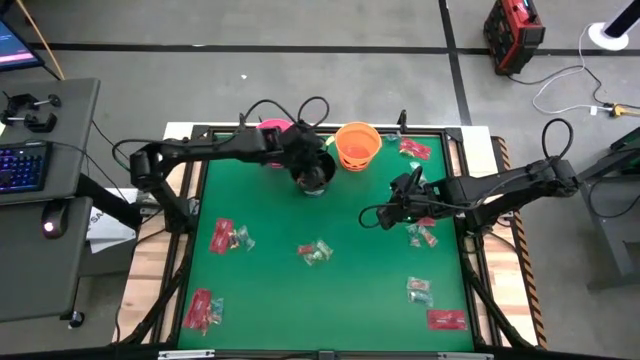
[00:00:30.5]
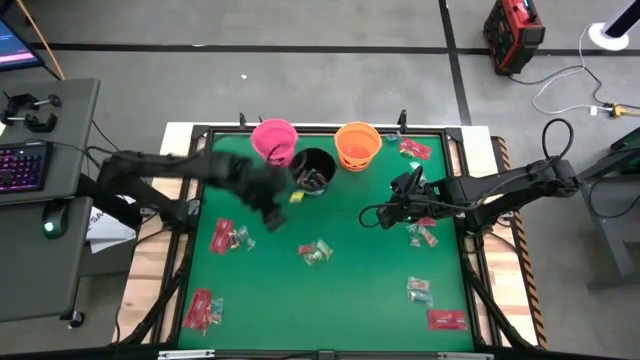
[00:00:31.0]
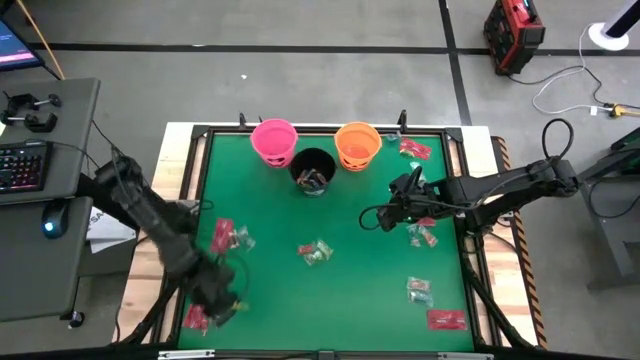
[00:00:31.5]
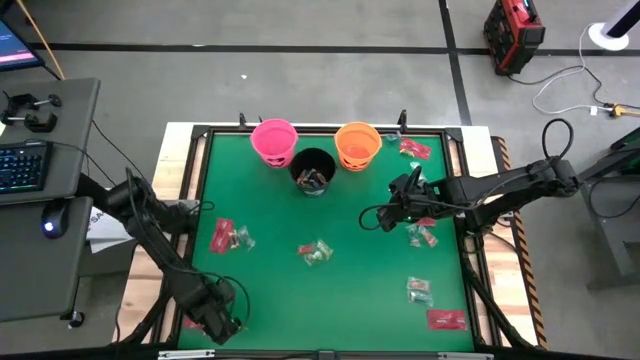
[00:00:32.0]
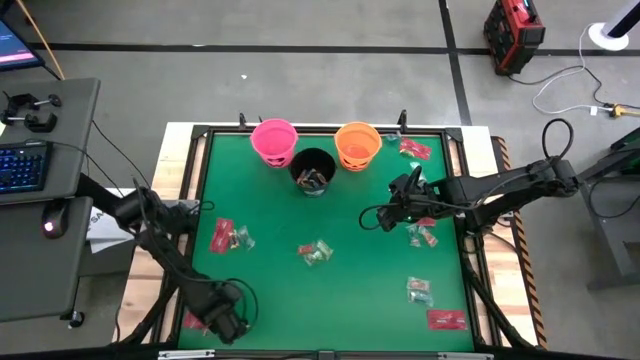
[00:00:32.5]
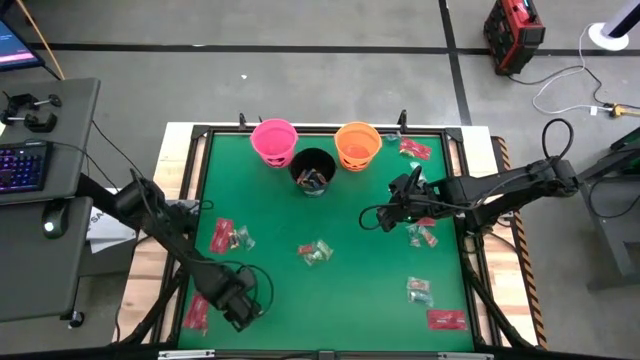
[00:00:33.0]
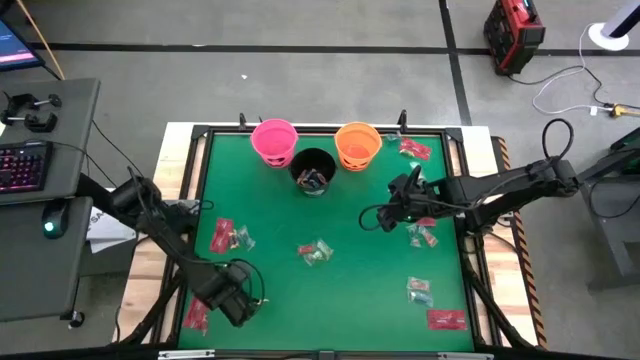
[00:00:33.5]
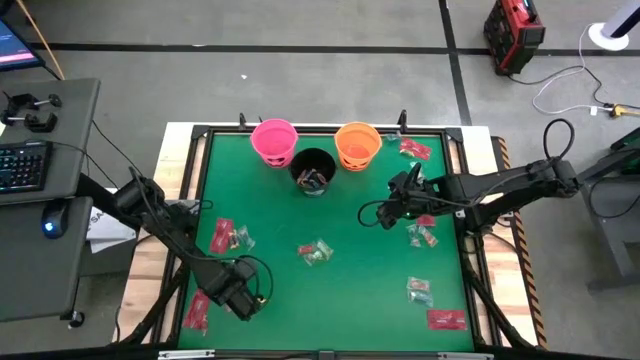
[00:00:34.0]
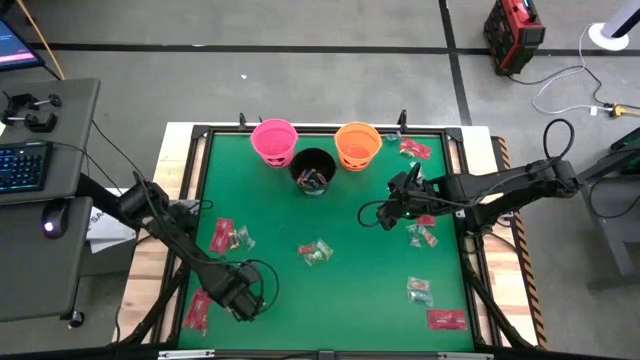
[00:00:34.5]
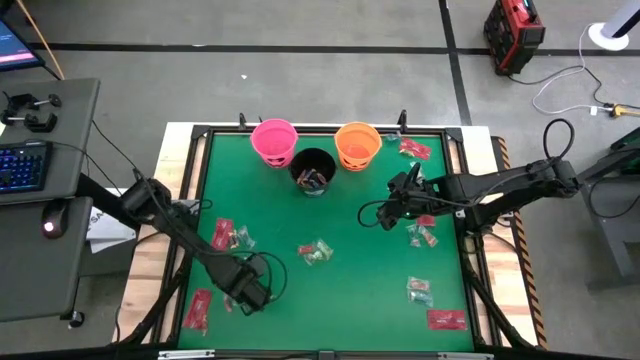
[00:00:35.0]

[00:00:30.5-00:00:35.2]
Task: Sort candy by brand, put in halloween buckets
Adjust the blue gummy

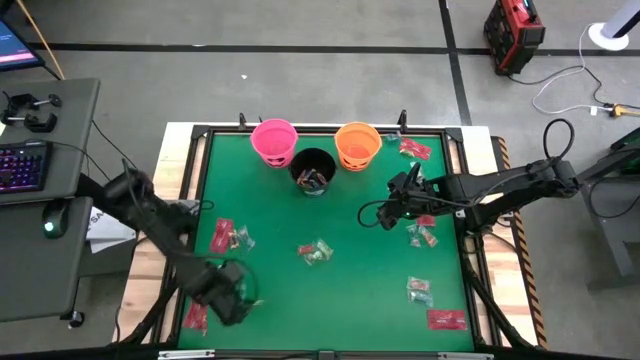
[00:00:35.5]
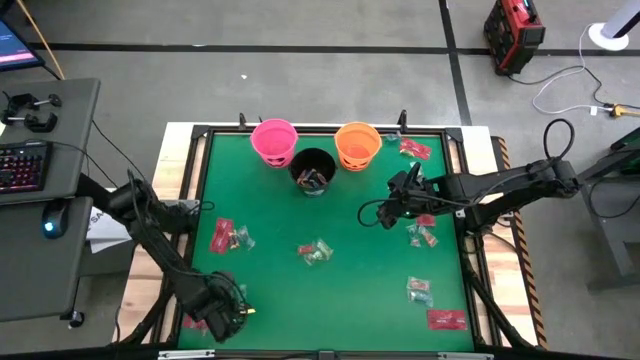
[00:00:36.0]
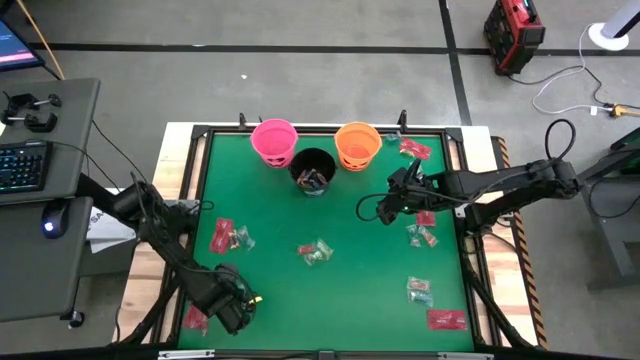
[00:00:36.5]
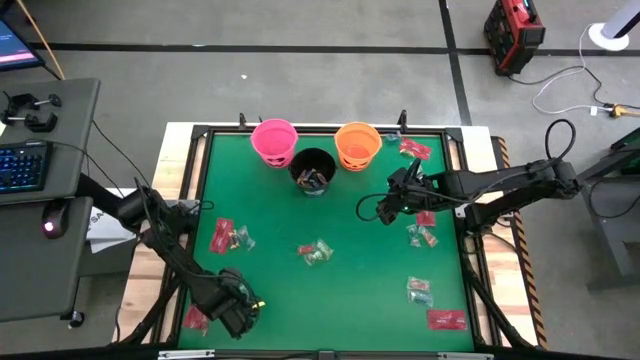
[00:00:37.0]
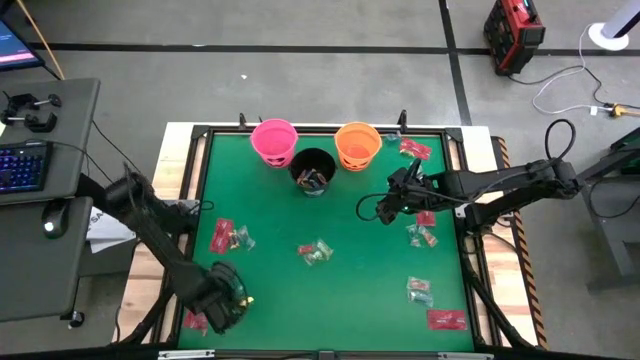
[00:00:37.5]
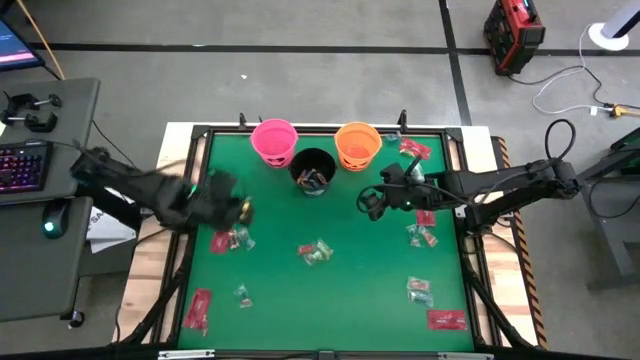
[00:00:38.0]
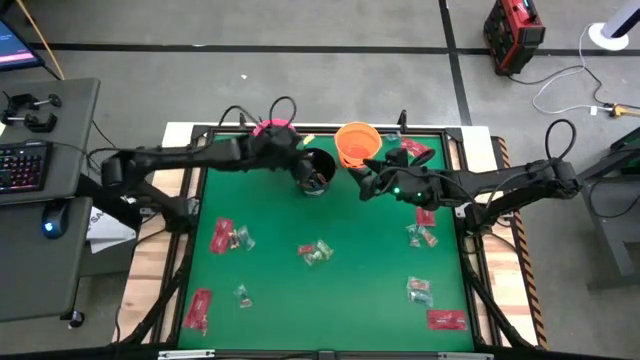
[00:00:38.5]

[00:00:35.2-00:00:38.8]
Put the orange candy into the black bucket

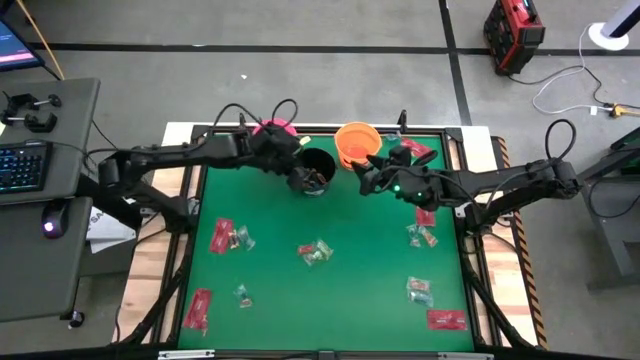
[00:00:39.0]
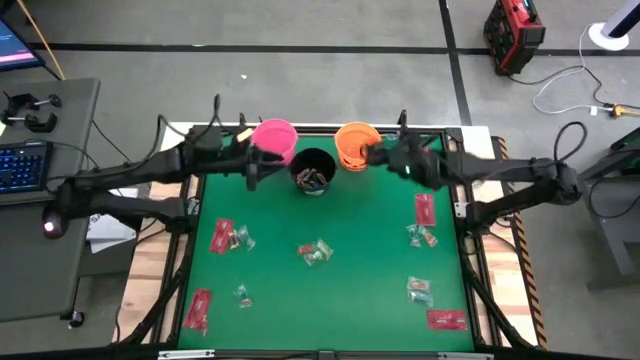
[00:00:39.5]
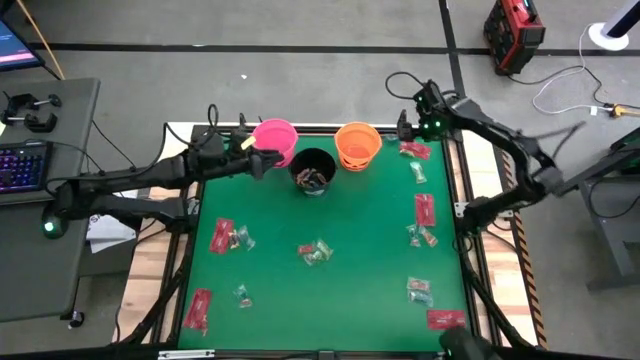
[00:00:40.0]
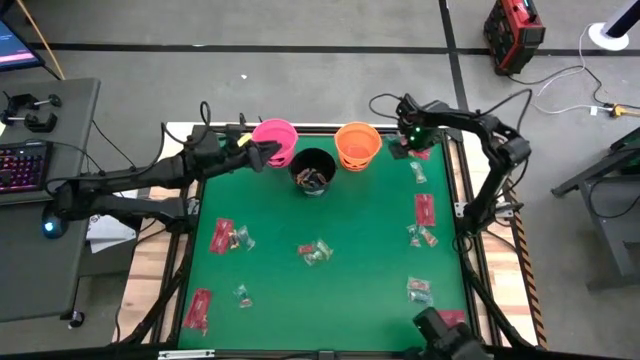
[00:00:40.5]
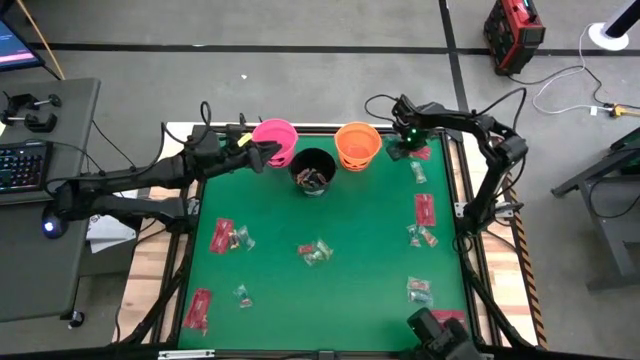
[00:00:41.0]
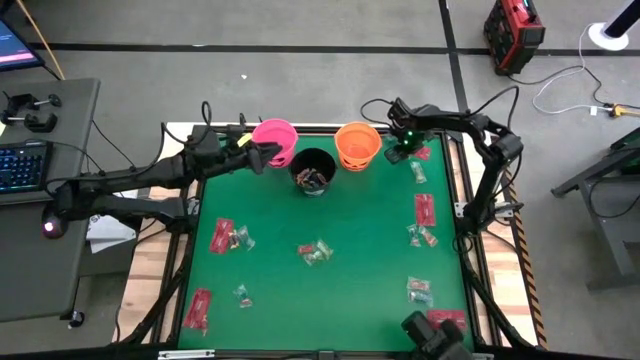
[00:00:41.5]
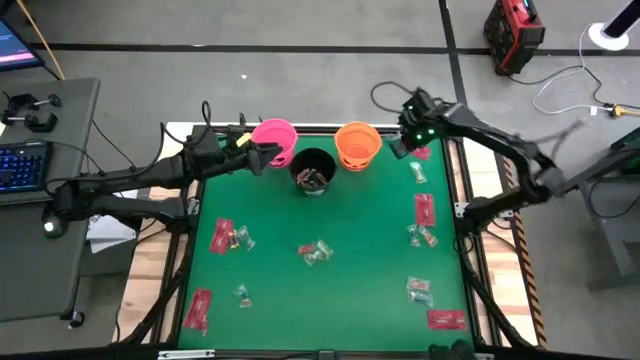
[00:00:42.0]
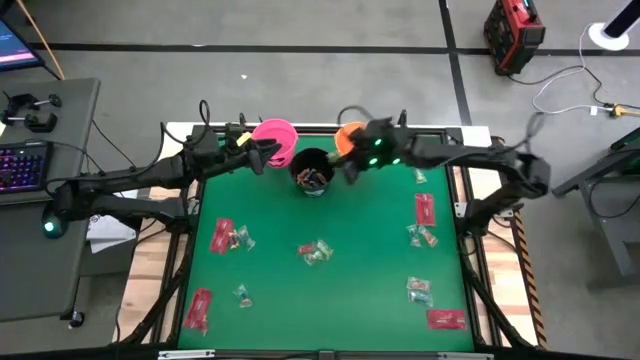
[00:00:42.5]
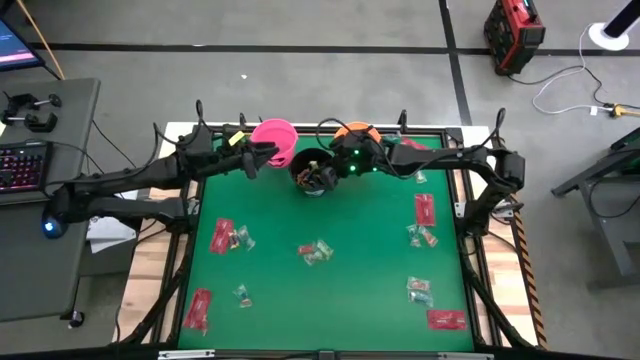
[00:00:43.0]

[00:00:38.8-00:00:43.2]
Put the green candy into the black bucket

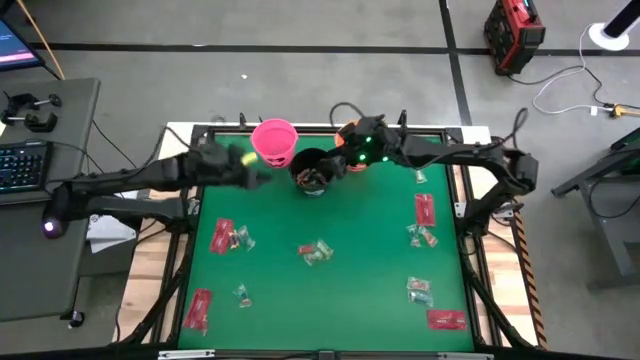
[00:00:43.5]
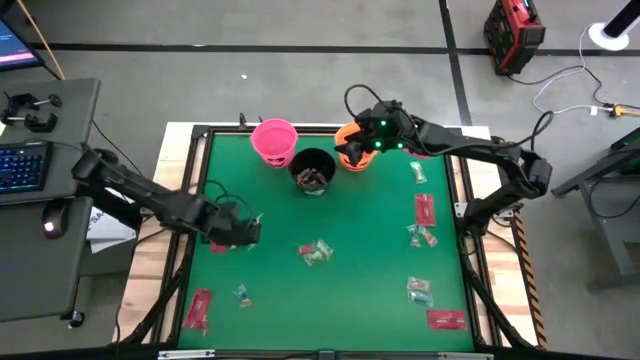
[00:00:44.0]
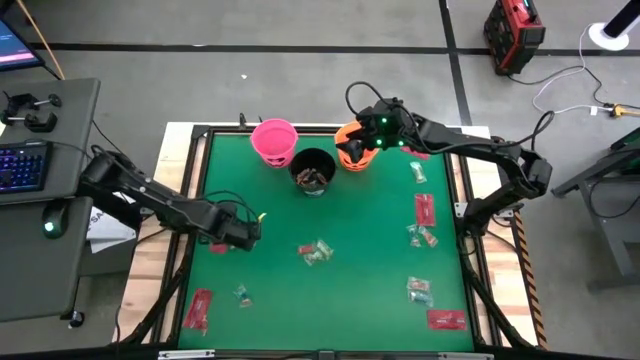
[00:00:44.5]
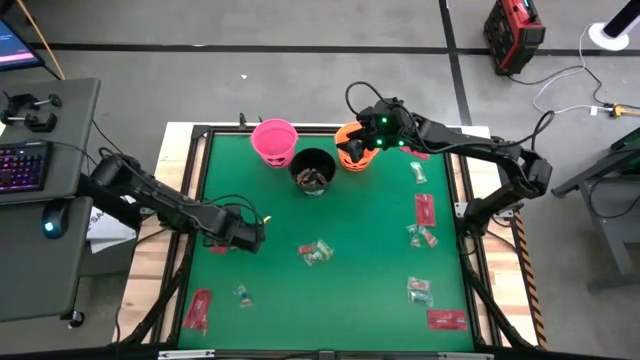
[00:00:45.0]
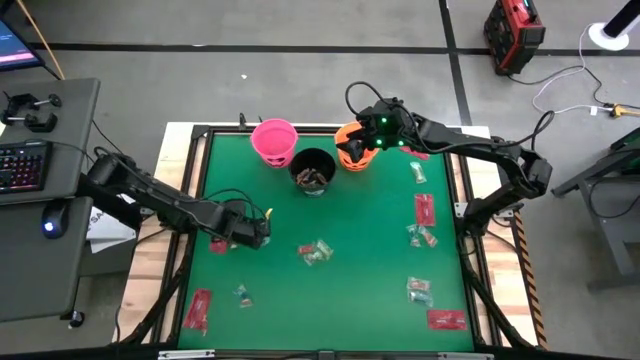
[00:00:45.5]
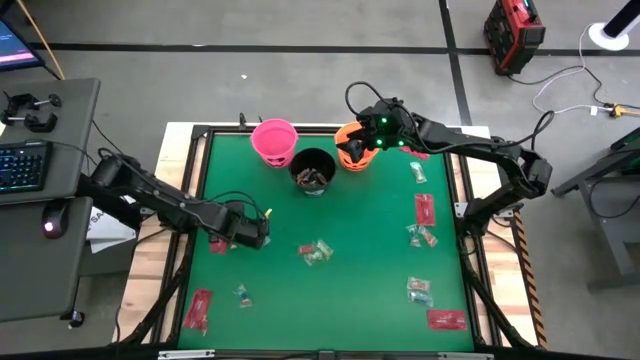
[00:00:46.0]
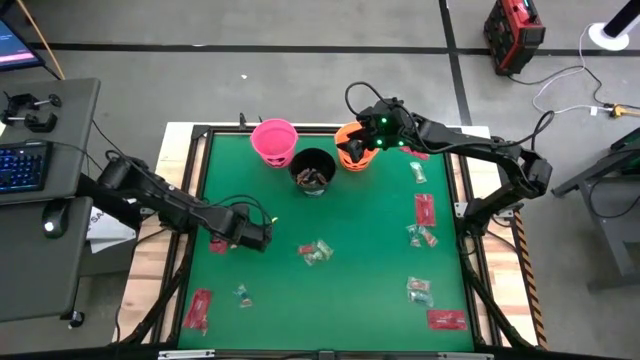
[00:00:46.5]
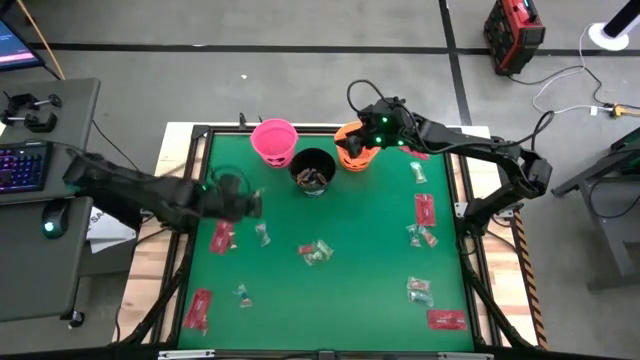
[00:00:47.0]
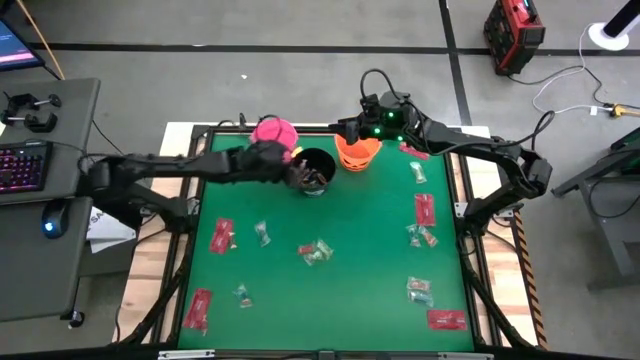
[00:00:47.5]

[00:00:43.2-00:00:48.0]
Put the red candy into the black bucket

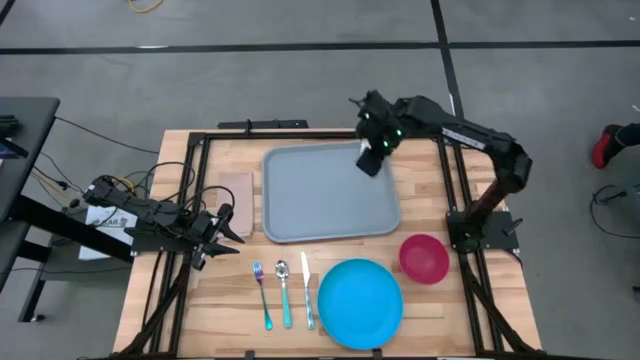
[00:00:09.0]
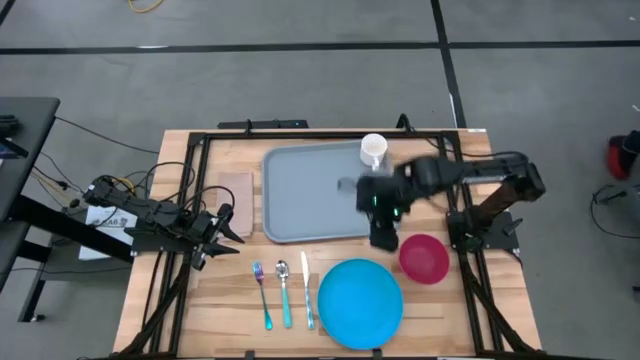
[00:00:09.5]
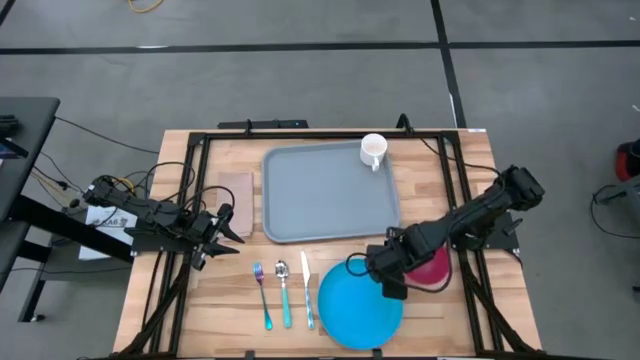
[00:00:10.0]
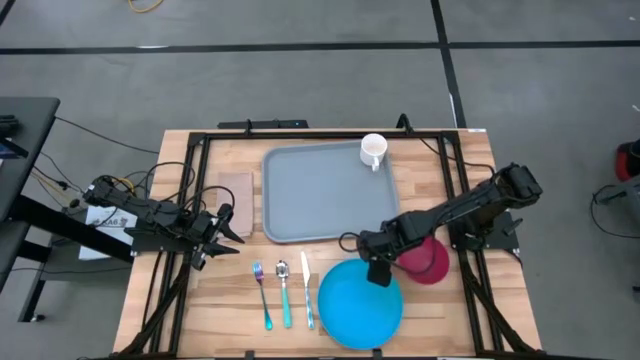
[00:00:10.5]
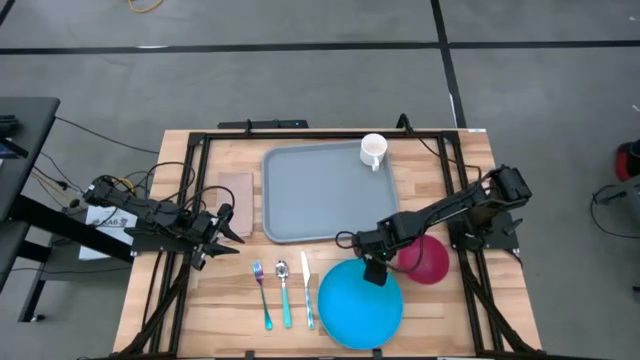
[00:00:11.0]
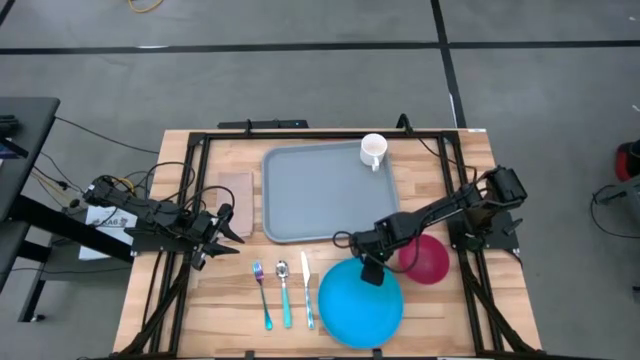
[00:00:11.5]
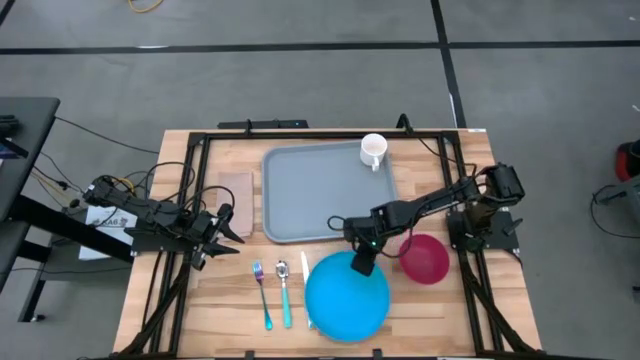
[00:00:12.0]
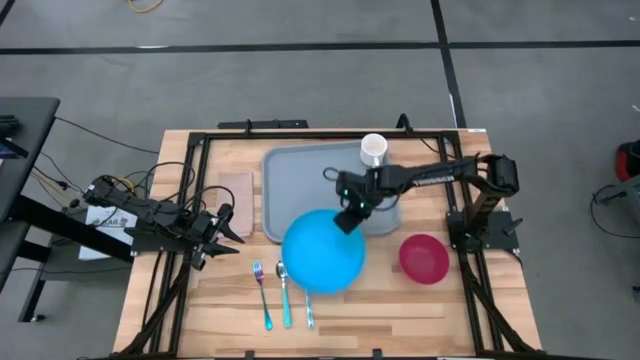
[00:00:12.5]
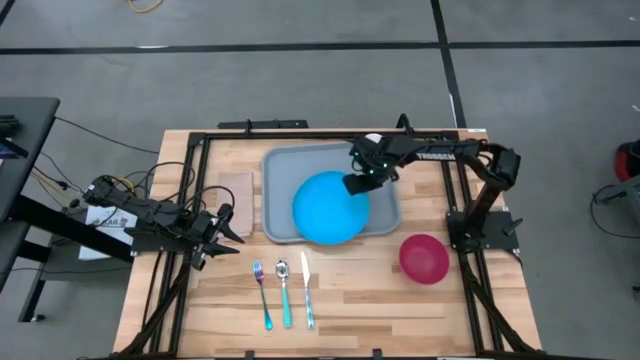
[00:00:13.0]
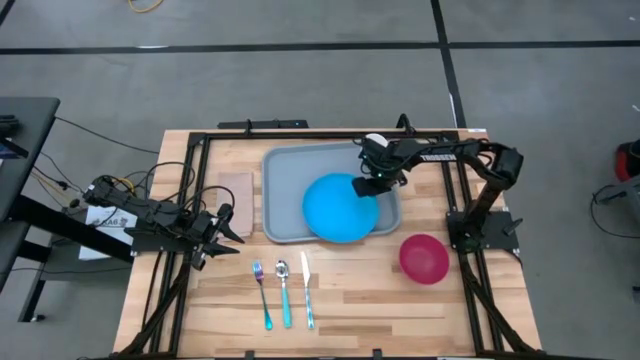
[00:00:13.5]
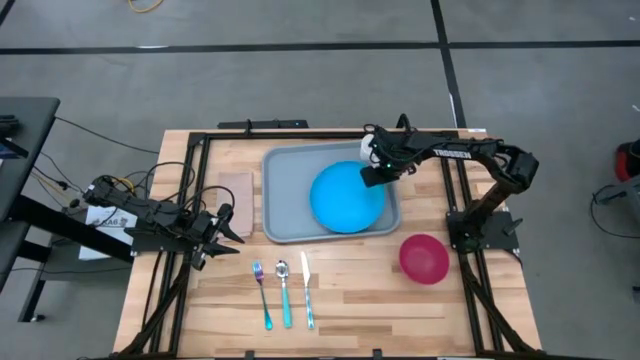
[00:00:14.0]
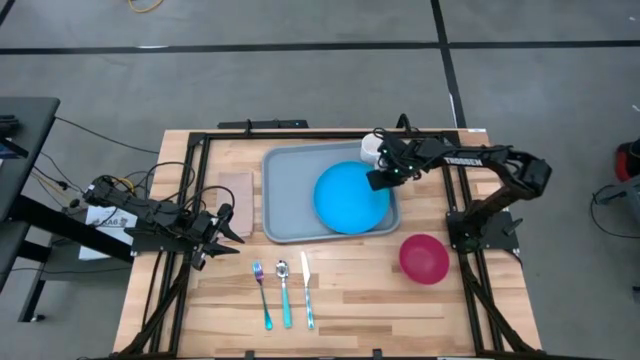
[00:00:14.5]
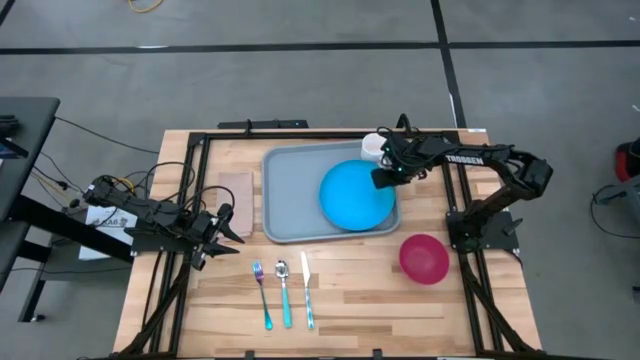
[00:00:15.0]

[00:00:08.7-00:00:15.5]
Task: Set up tray
Put the blue plate at the bottom of the white mug on the blue tray
